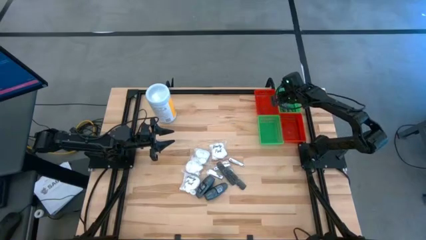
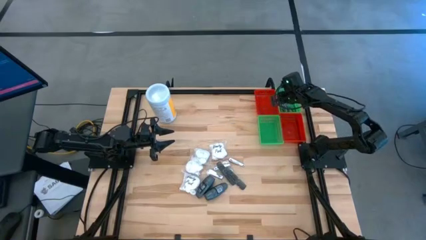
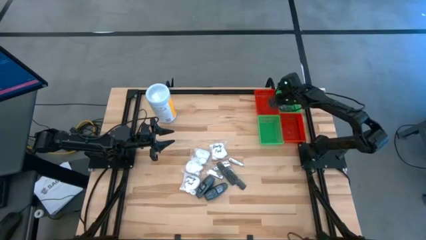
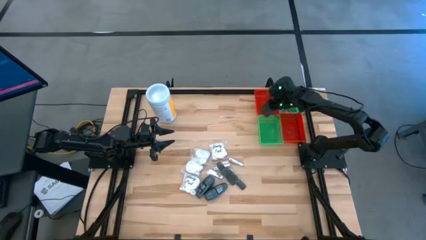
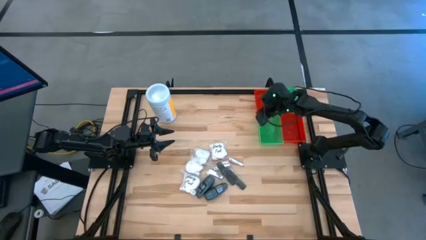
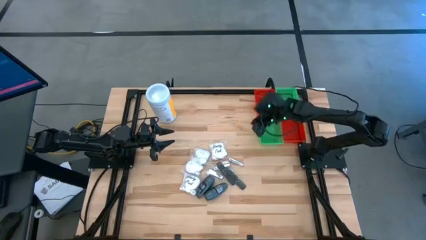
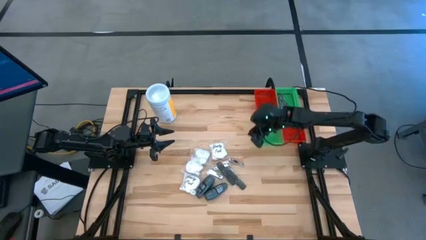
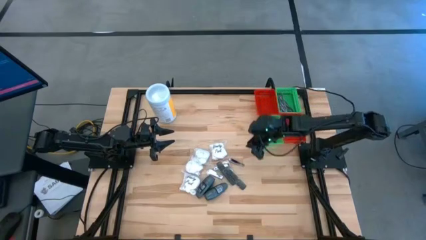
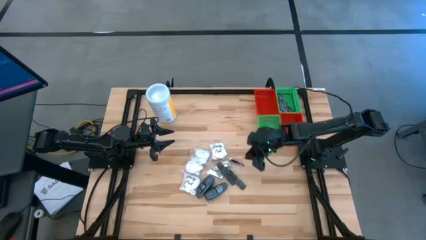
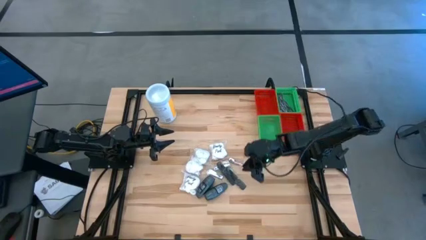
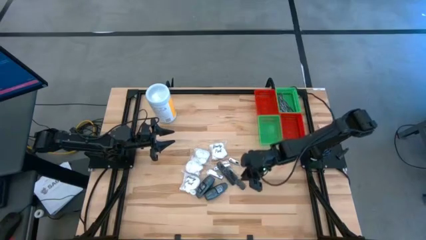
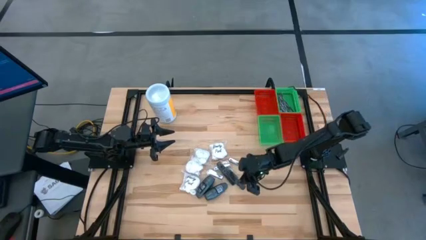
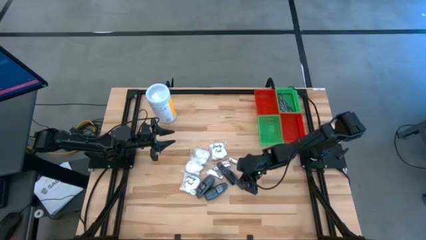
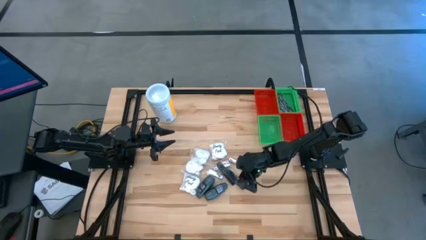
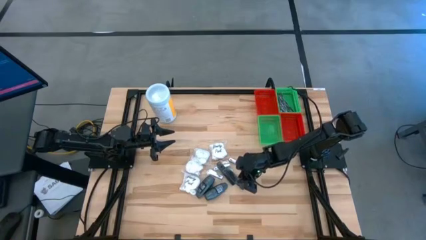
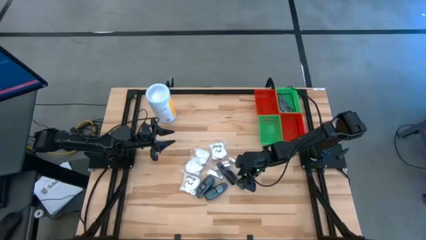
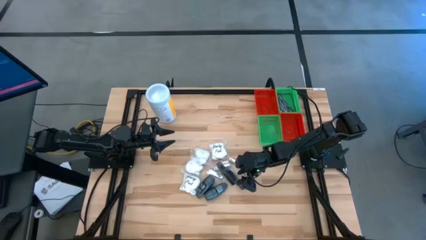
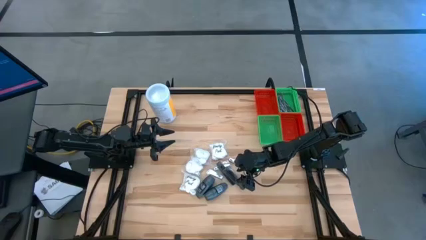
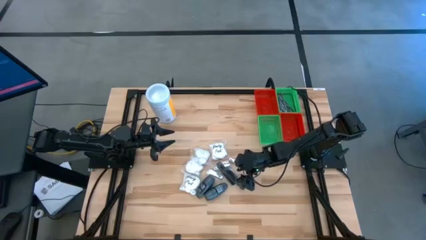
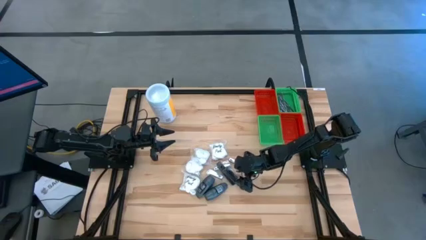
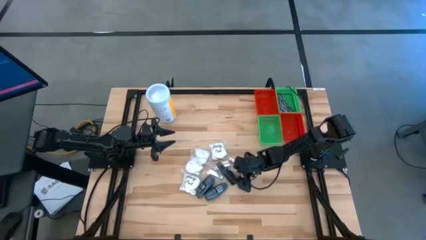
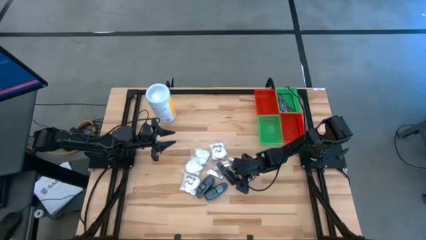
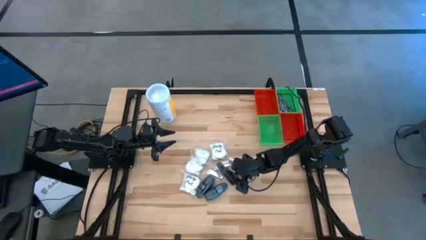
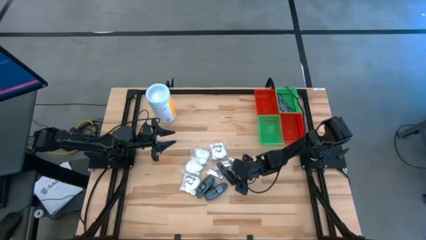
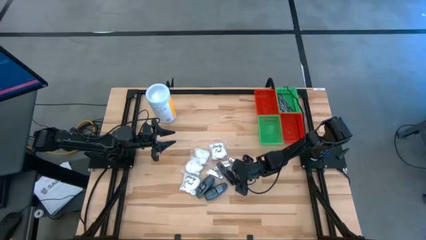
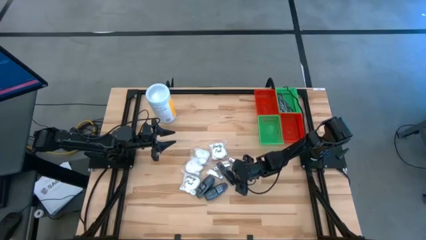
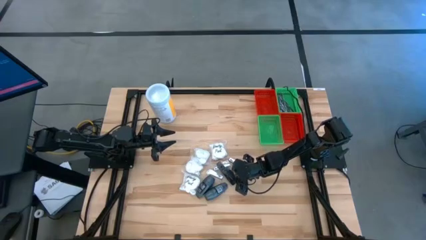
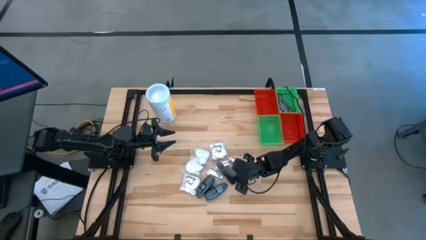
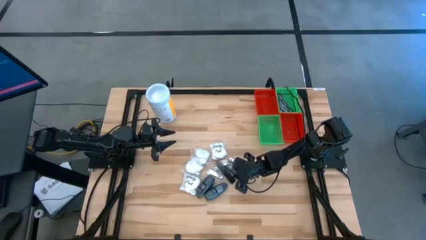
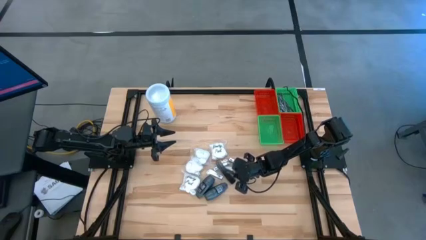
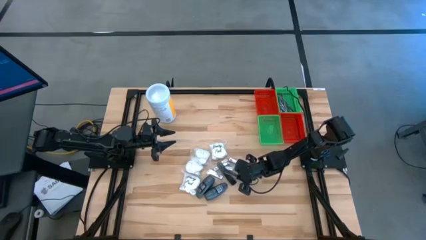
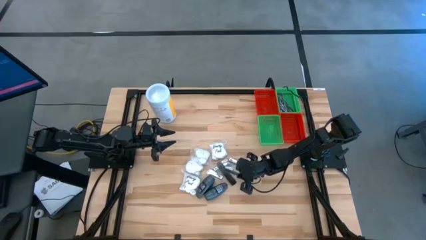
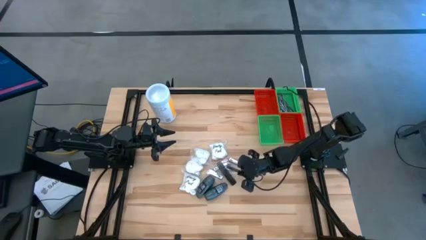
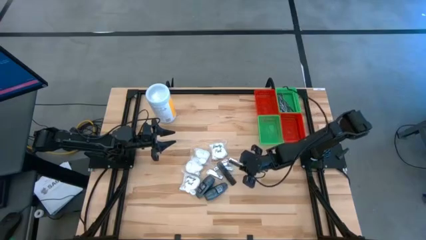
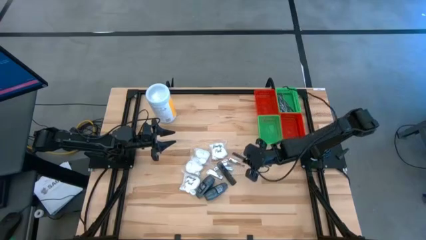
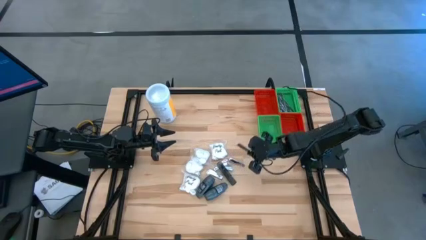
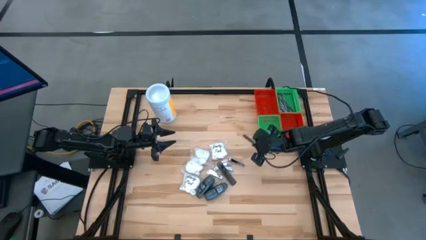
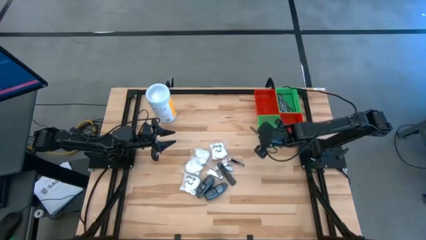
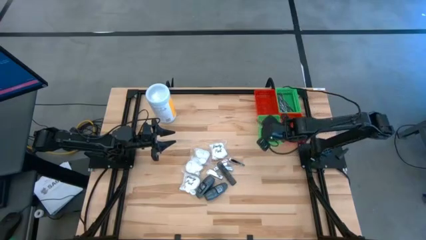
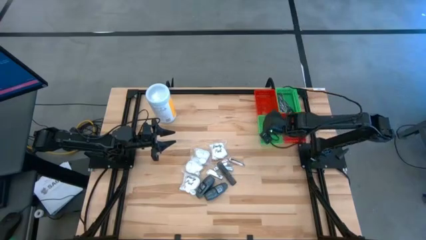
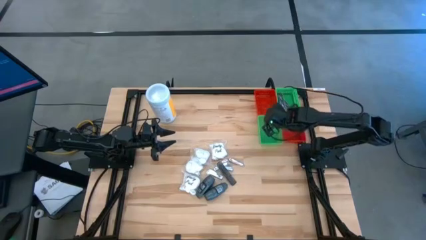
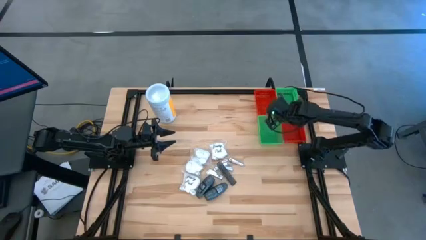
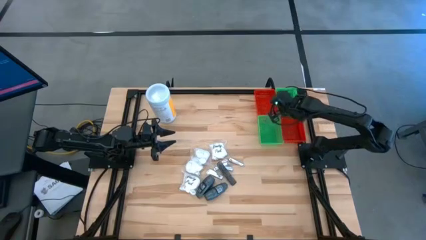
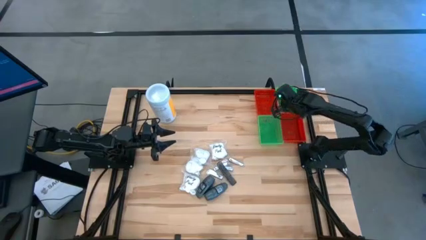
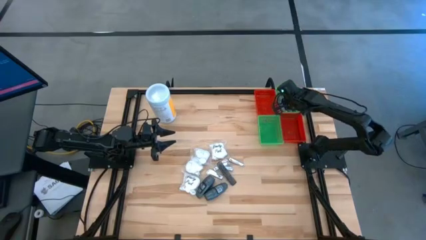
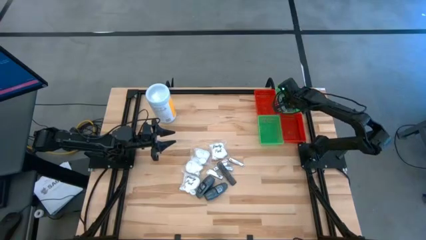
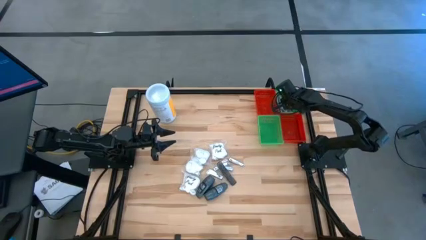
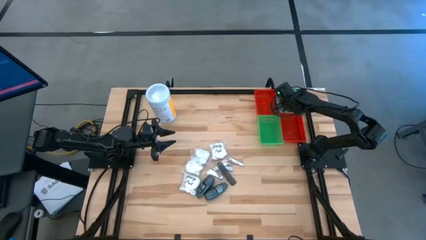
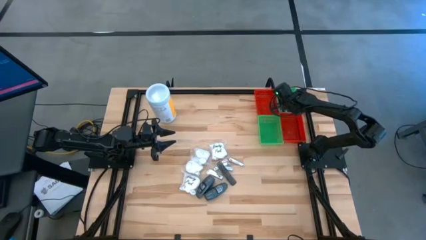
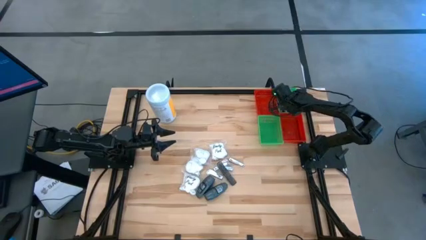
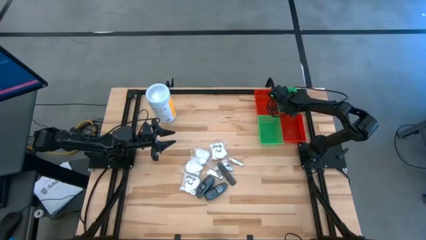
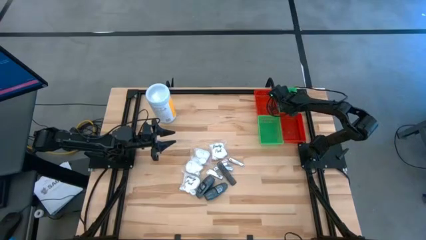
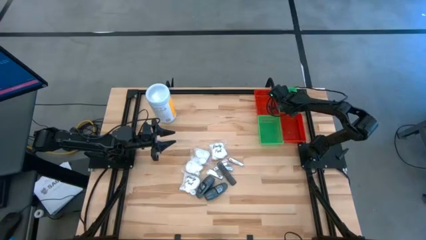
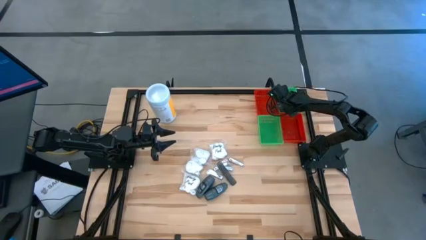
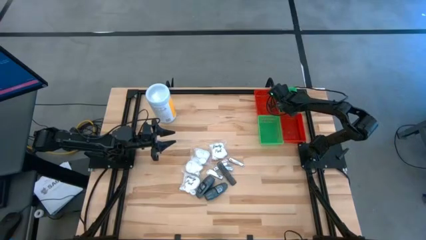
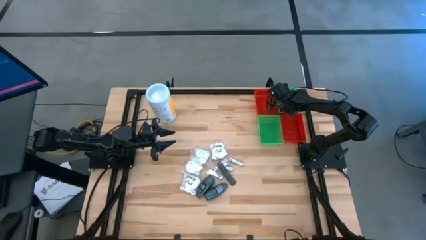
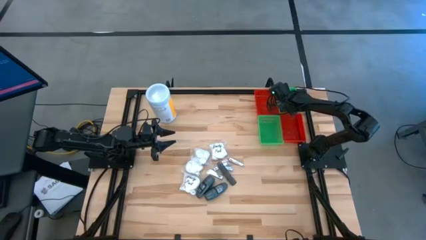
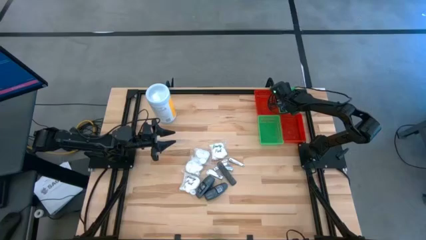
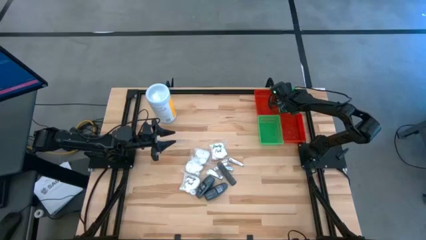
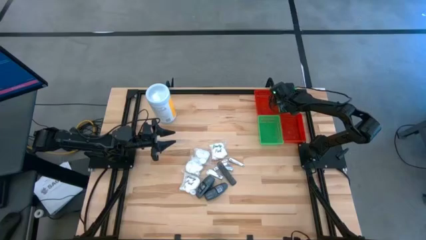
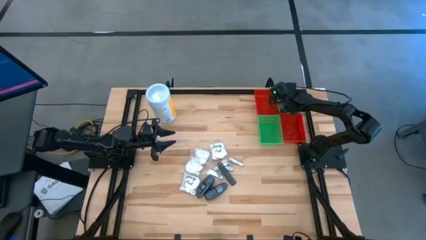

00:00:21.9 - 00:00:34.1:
Task: Pick & Place Travel size toiletries
Put the black comb into the top green bin
